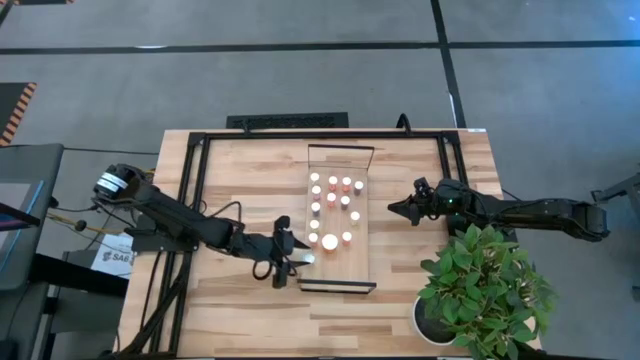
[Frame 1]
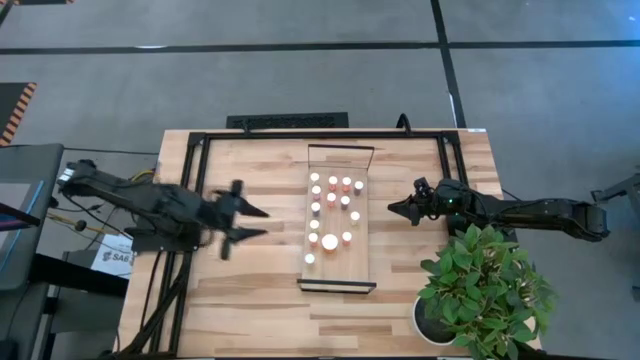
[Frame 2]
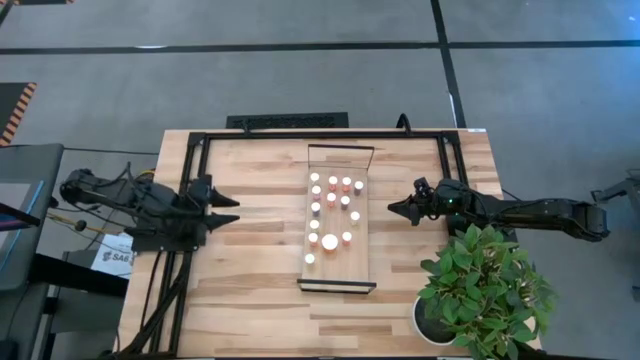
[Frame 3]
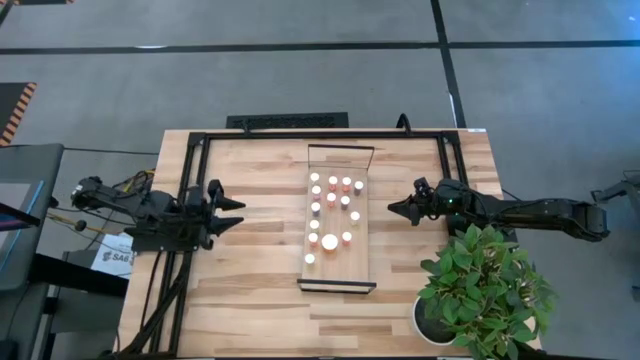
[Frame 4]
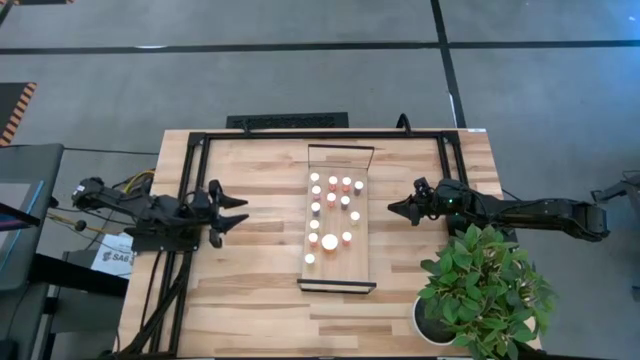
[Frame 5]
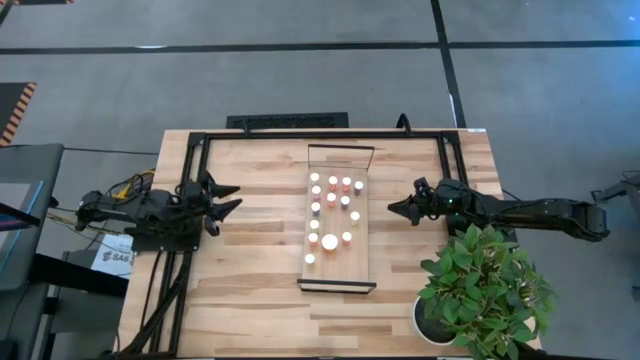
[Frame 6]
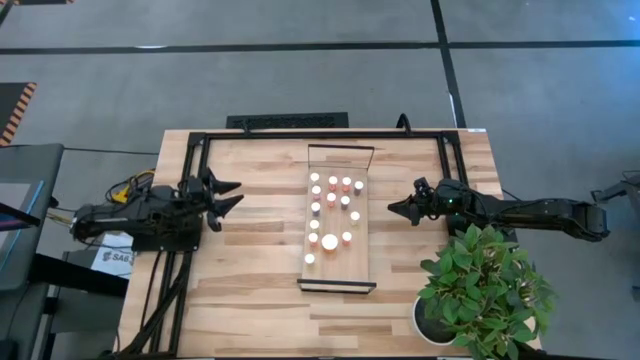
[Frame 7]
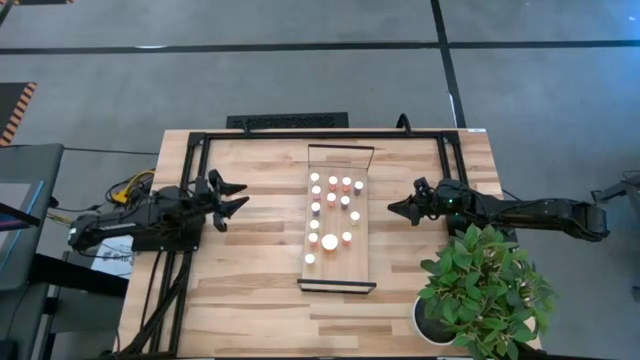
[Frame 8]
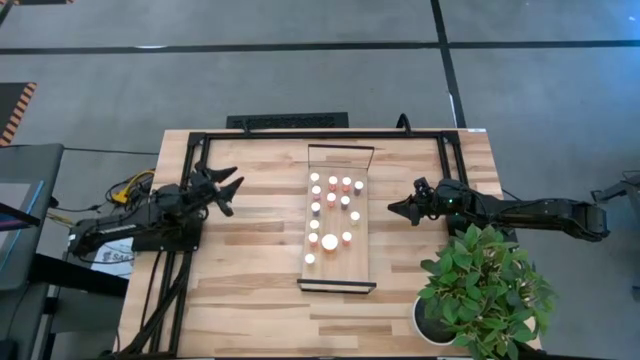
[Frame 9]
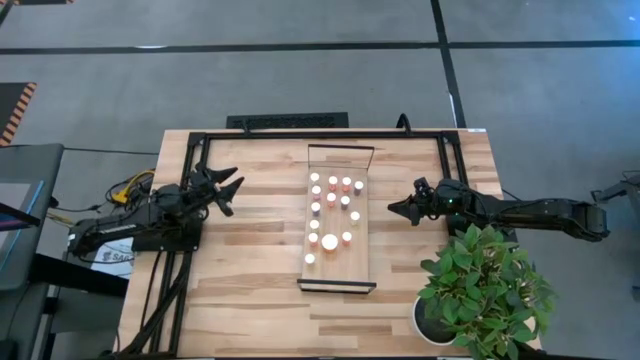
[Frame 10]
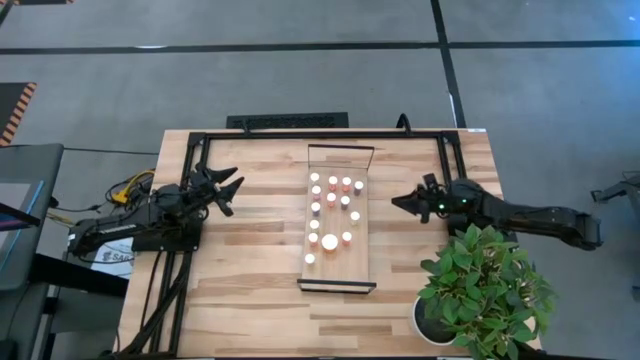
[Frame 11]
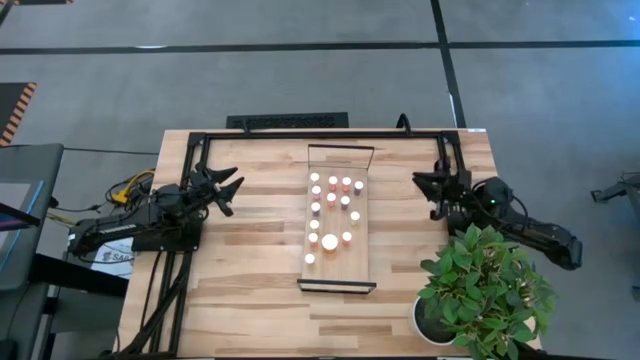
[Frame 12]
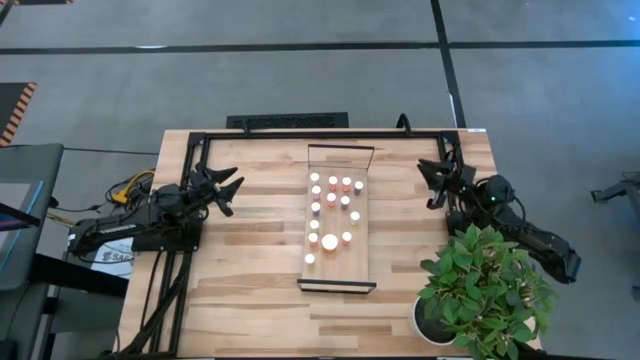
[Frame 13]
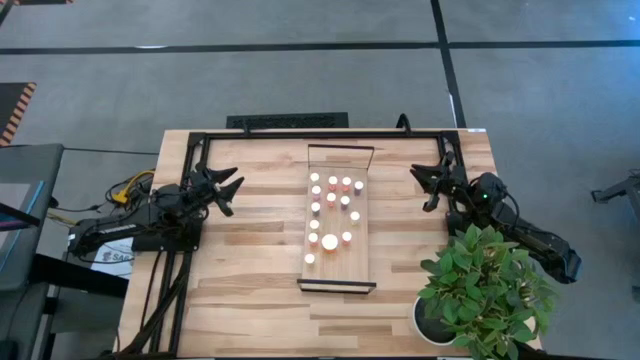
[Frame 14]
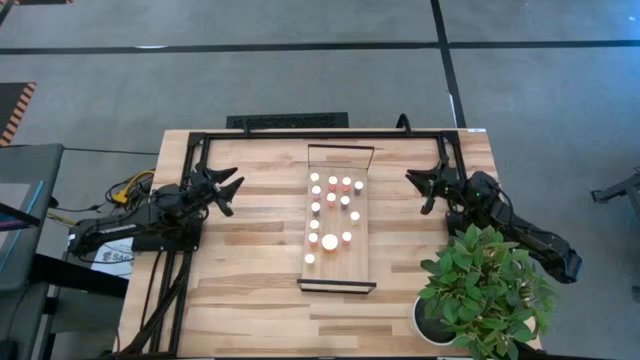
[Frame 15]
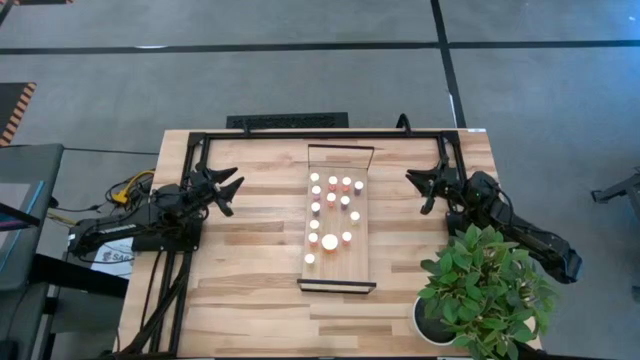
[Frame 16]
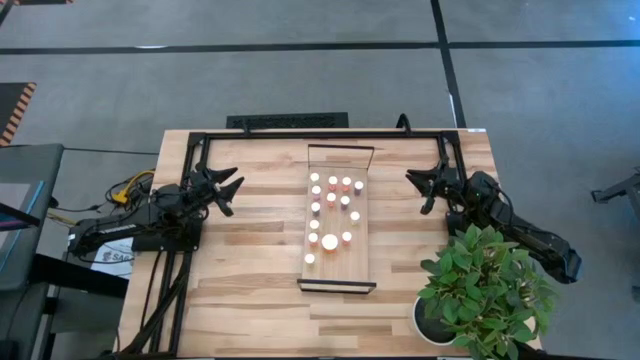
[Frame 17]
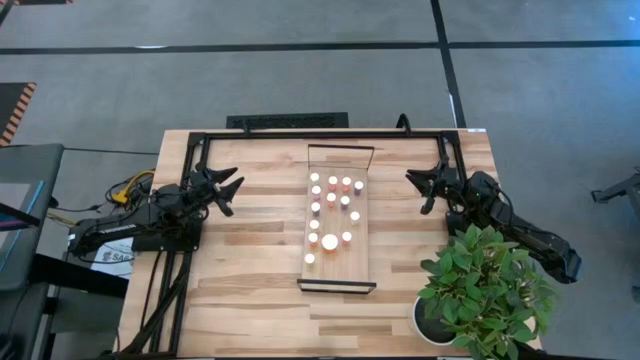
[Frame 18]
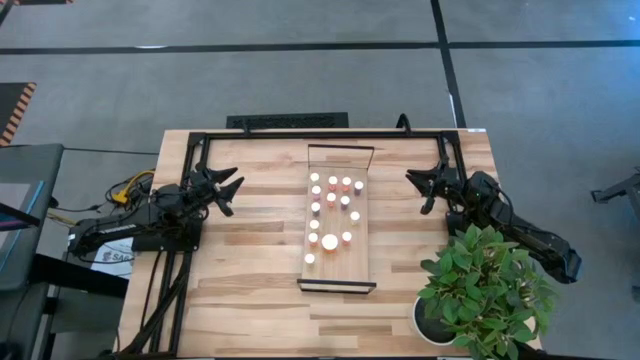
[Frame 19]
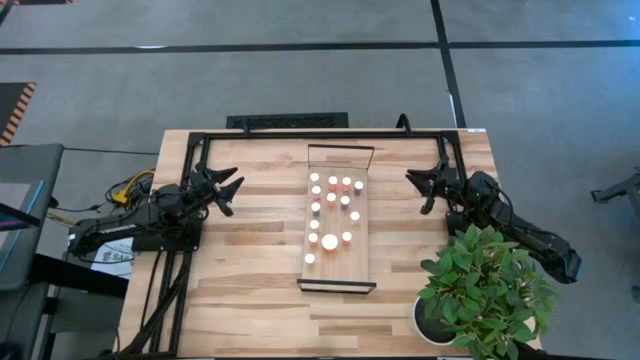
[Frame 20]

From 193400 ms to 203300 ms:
Task: Pick and place medicine bottles onto shelf by color
Return to Home Position

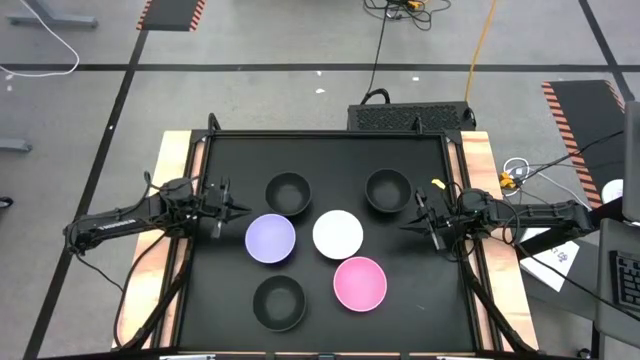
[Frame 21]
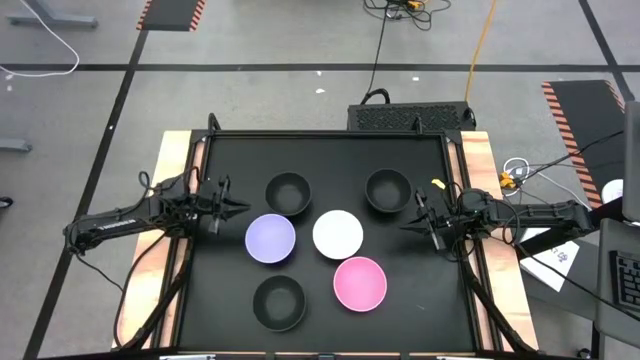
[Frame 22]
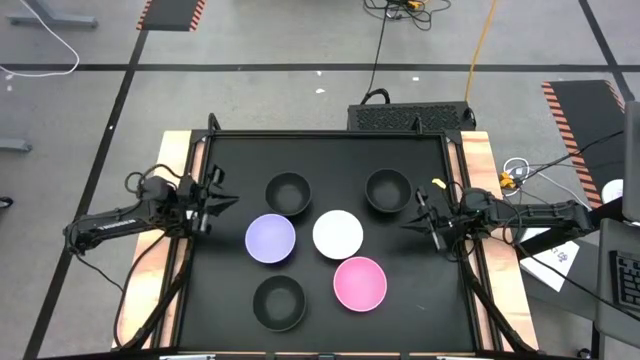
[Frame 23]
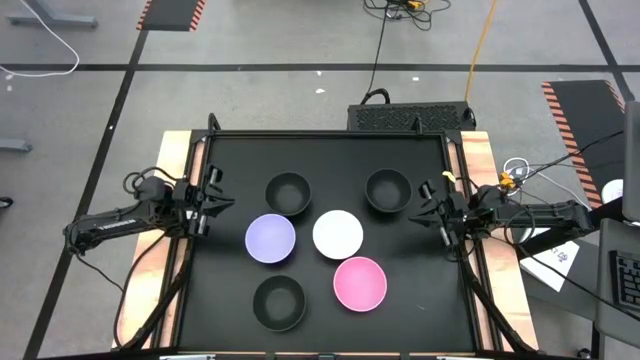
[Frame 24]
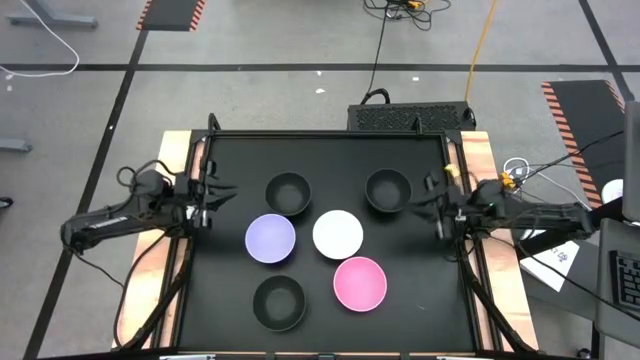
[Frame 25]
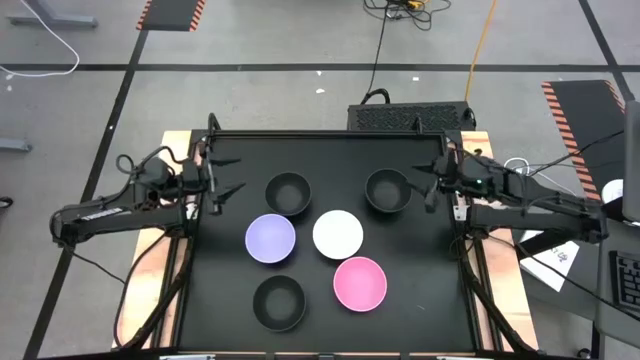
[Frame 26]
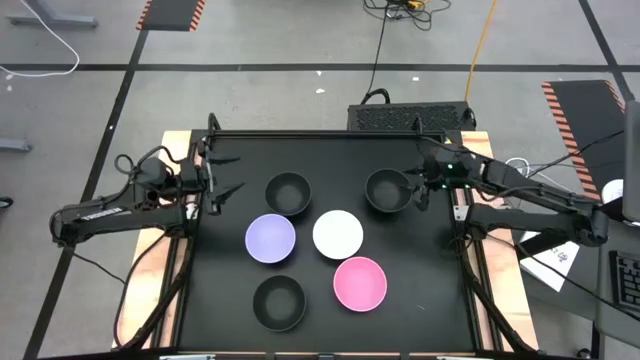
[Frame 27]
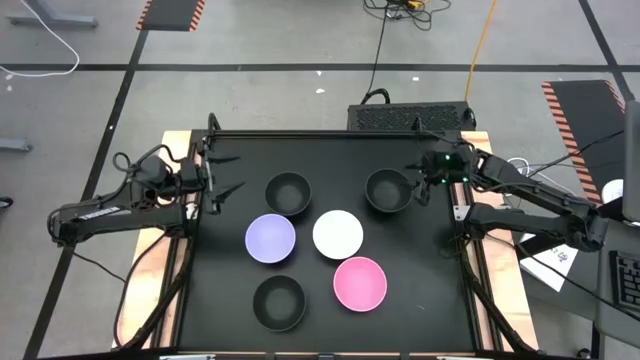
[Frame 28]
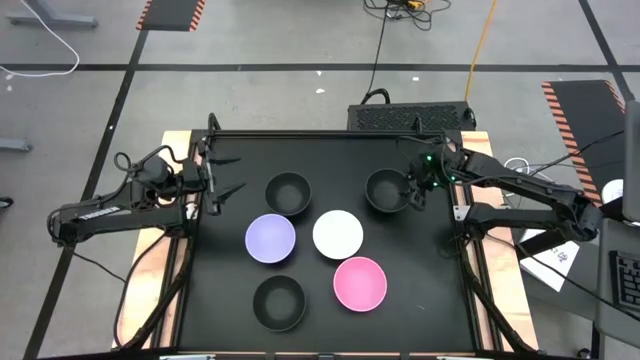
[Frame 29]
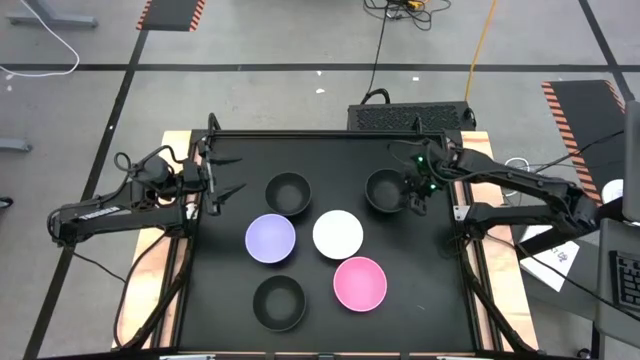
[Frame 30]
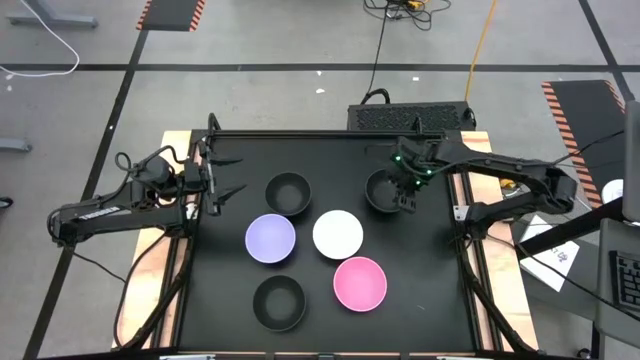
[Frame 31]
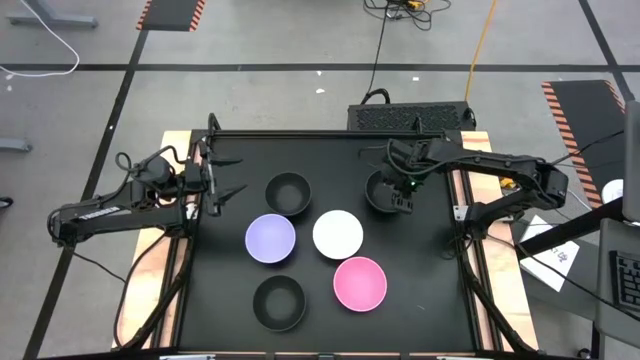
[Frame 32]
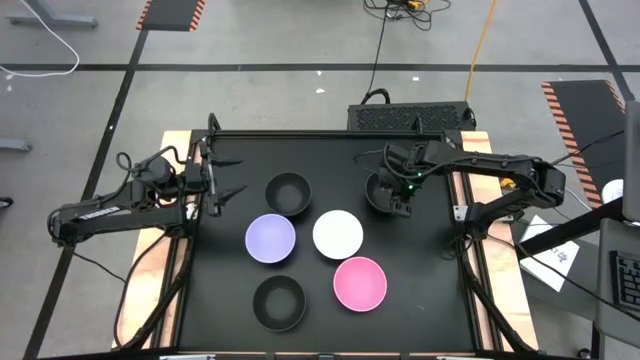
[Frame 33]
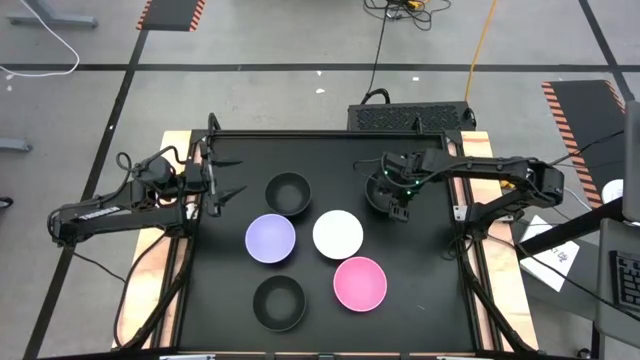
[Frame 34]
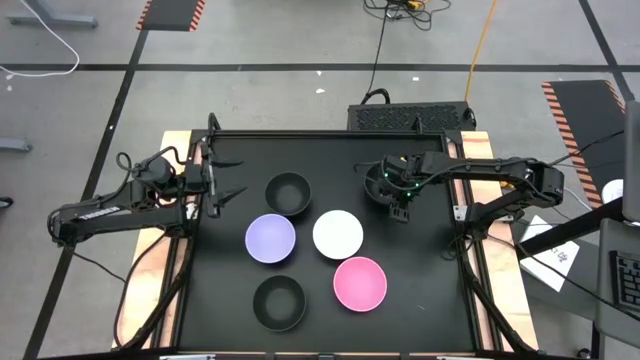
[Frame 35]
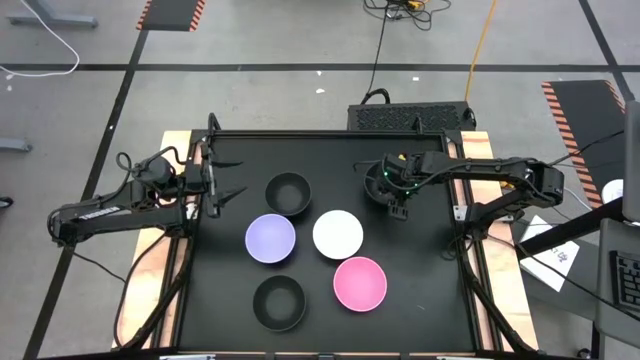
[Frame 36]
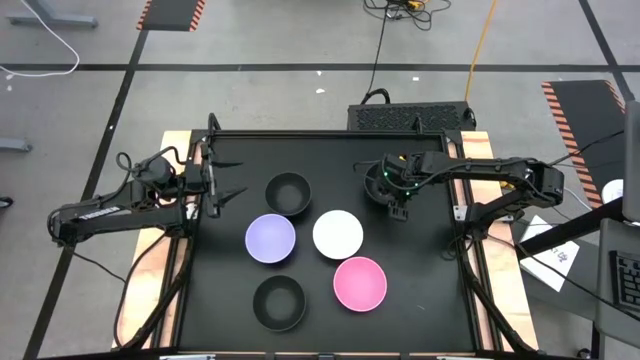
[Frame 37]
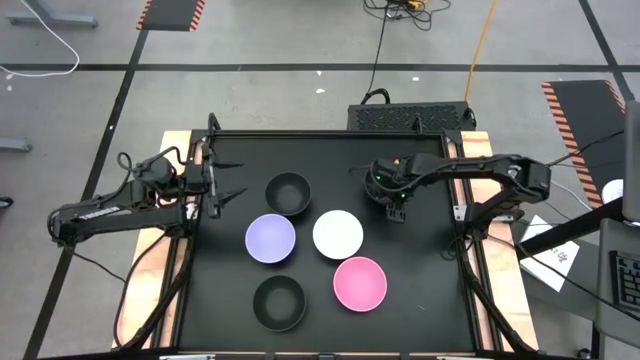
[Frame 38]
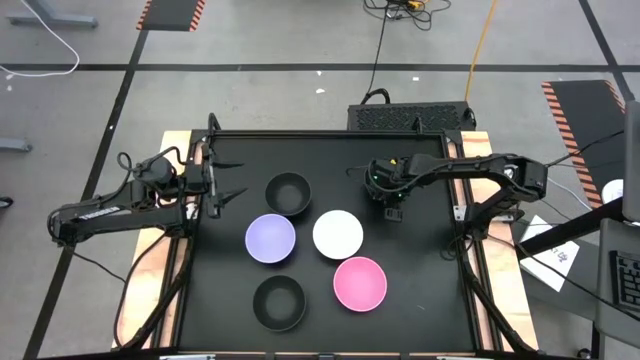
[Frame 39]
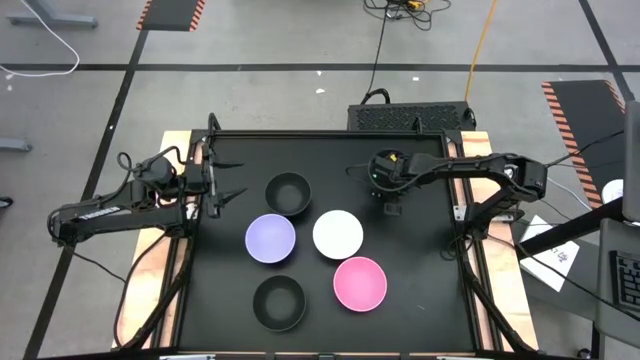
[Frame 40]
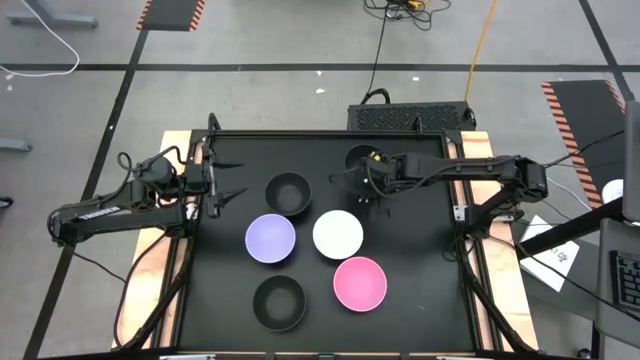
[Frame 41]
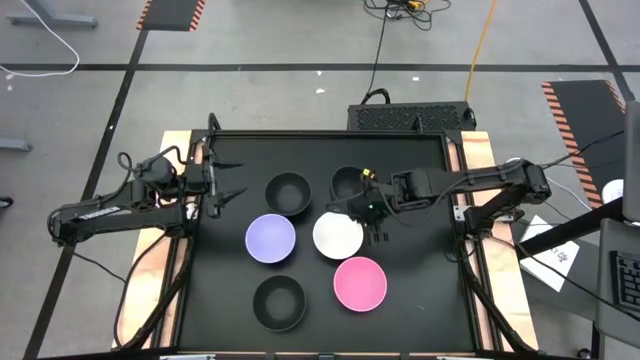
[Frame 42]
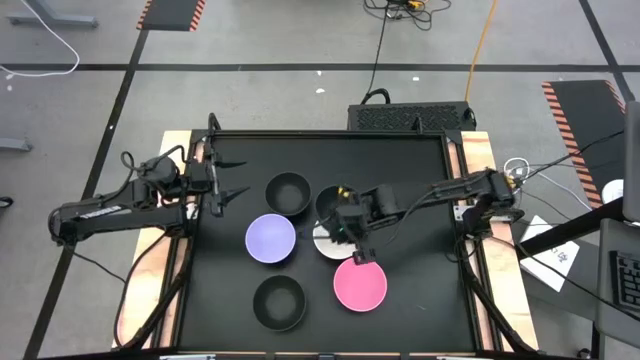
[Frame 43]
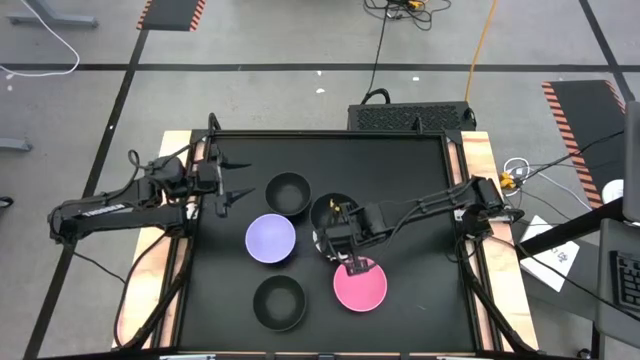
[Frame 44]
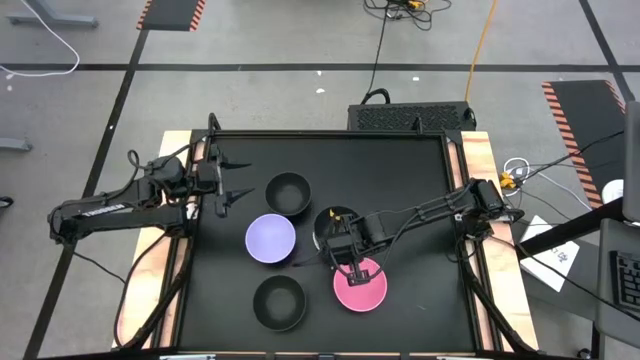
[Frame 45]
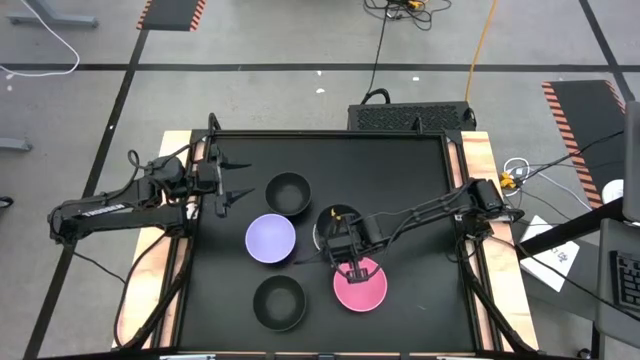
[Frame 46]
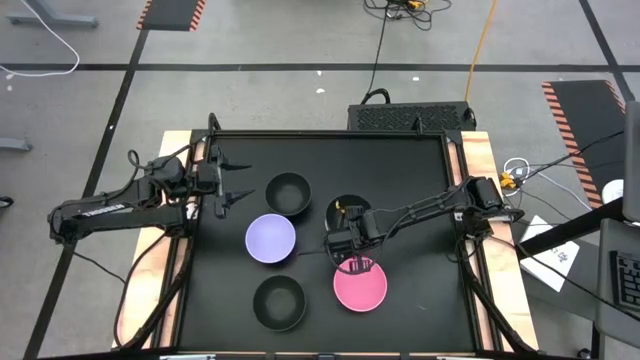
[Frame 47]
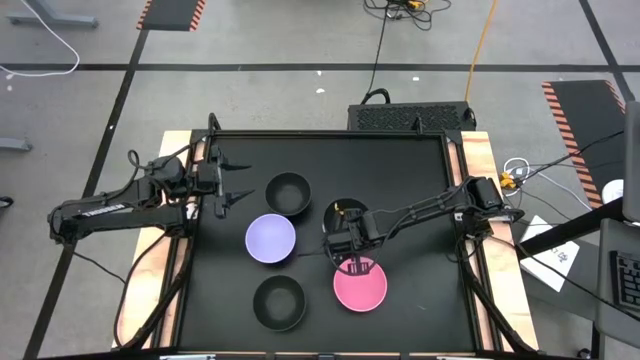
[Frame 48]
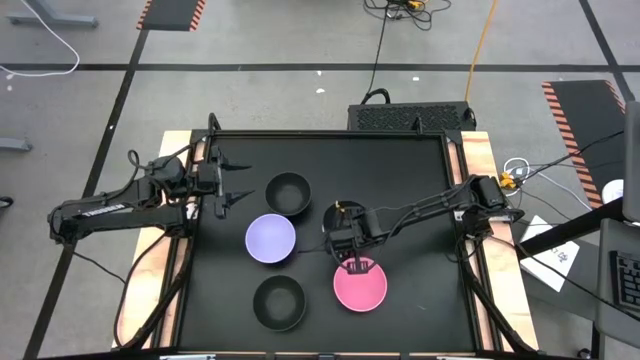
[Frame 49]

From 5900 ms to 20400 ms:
Task: Nest bowls inside each other
Stack the top right black bowl into the white bowl
